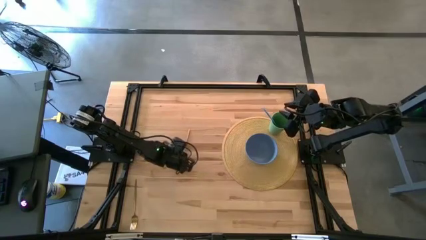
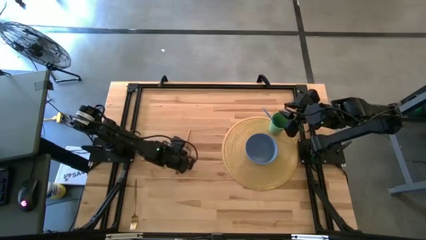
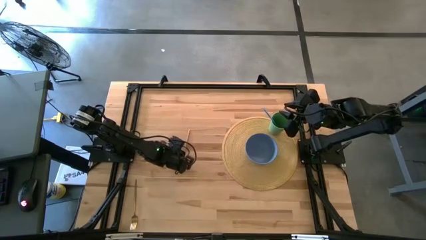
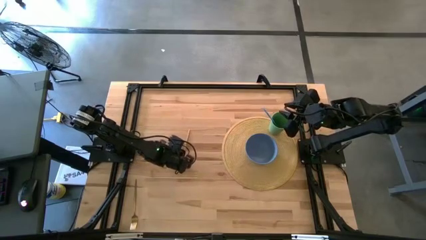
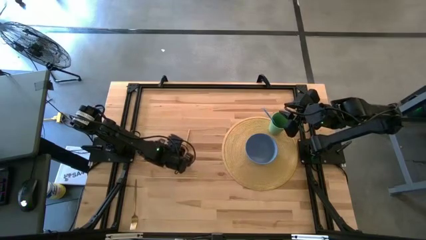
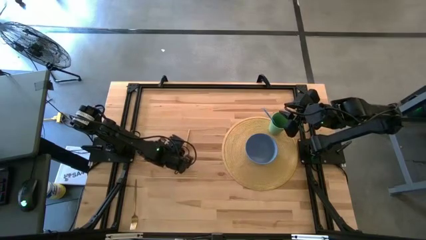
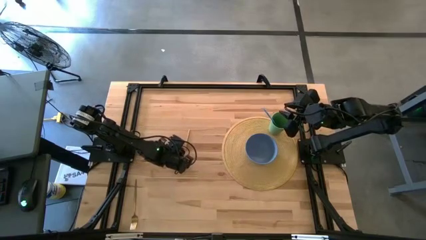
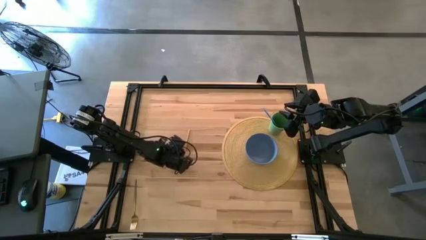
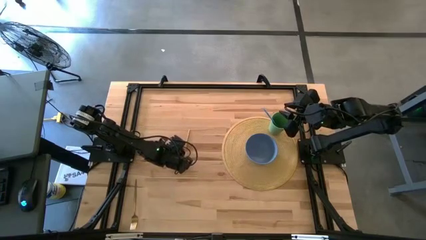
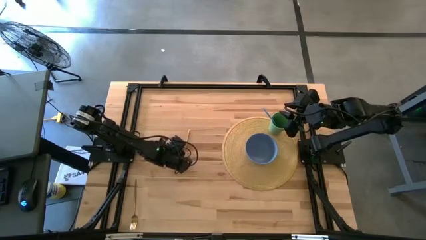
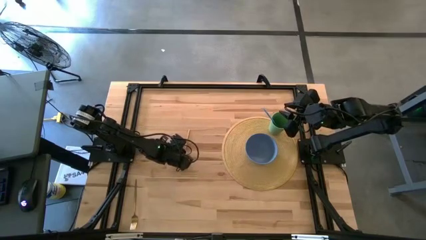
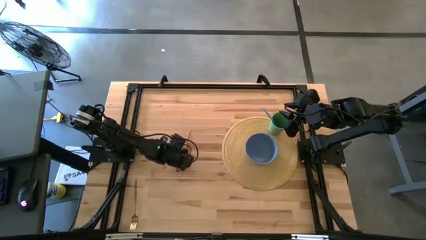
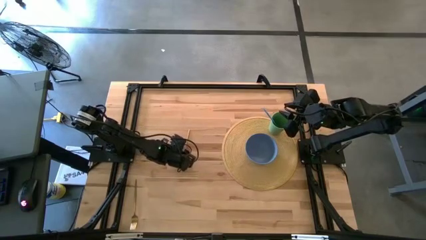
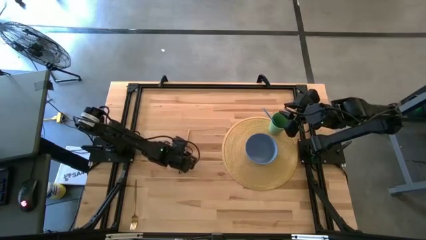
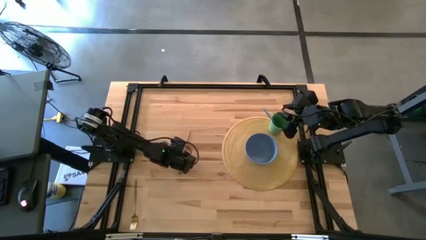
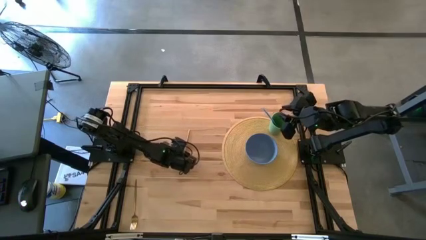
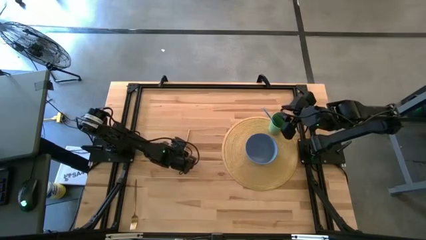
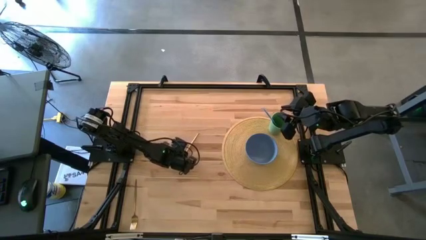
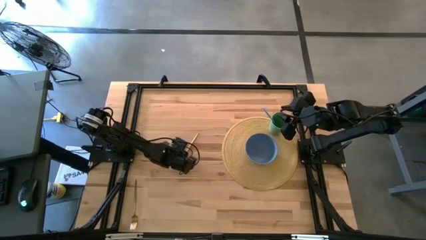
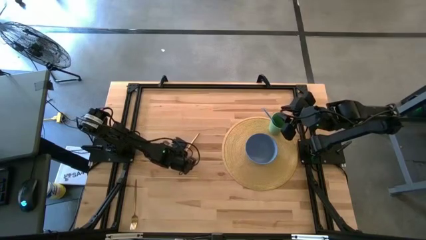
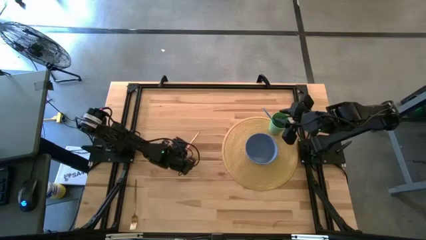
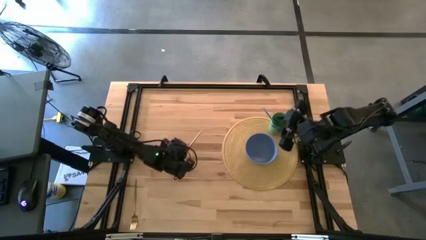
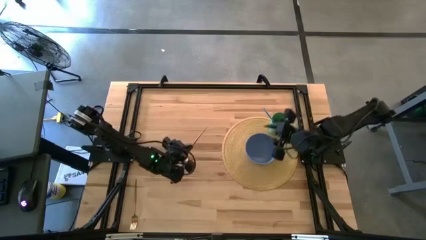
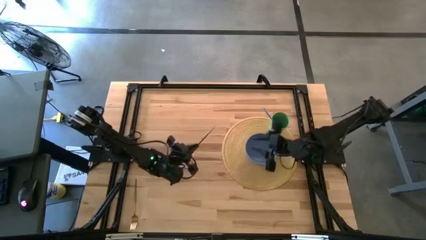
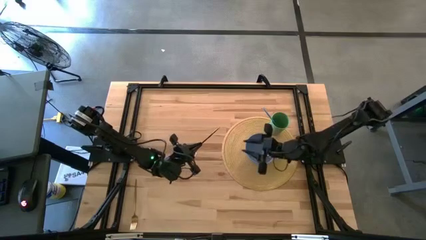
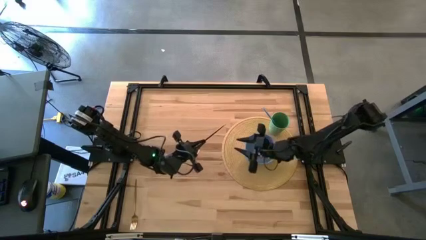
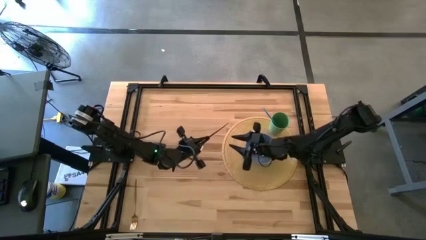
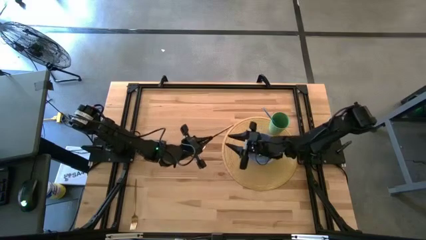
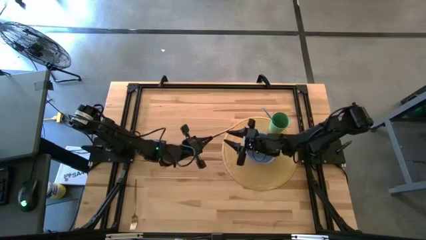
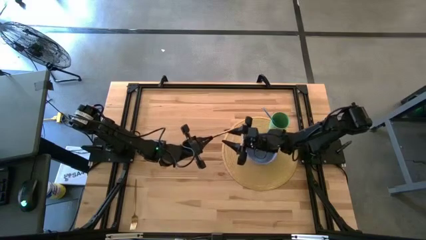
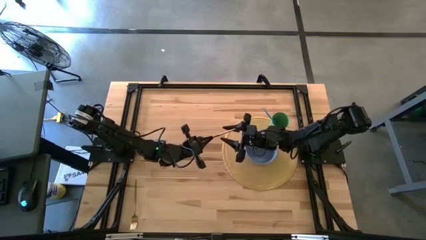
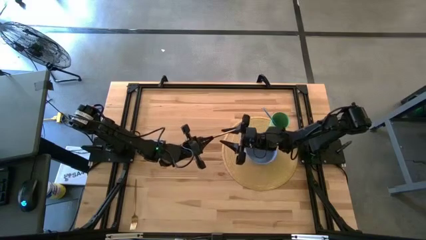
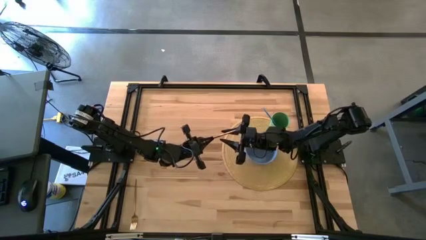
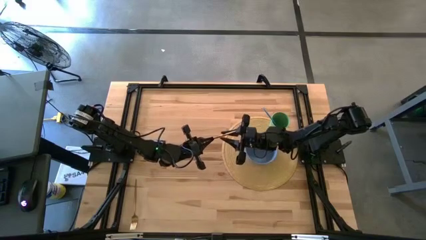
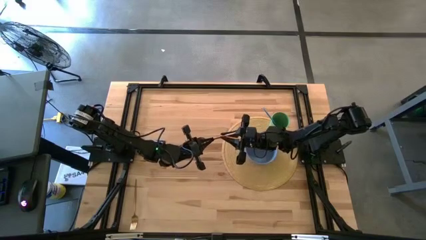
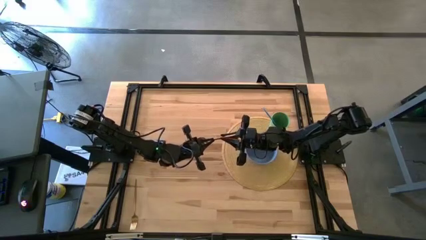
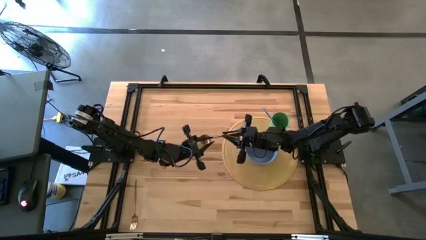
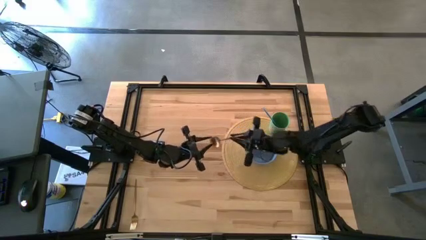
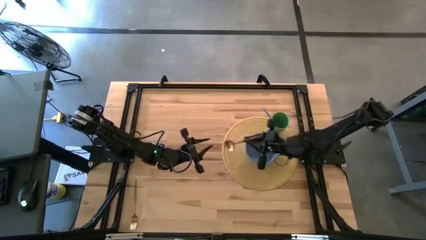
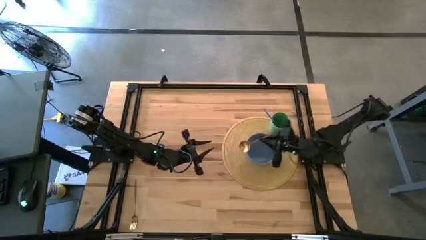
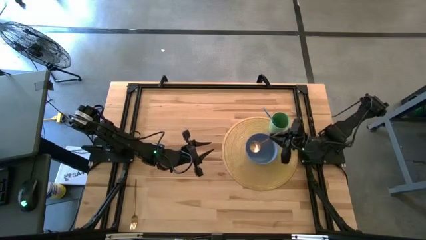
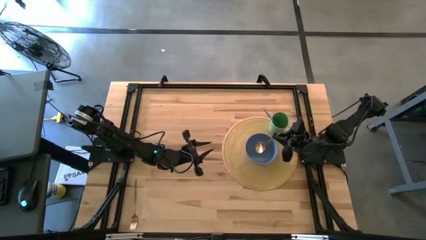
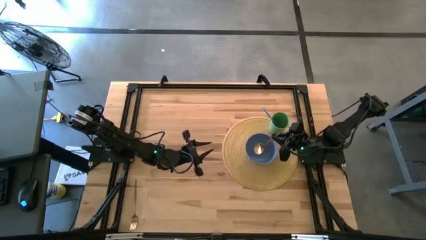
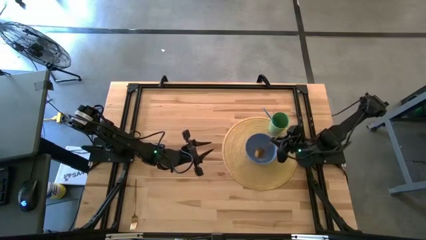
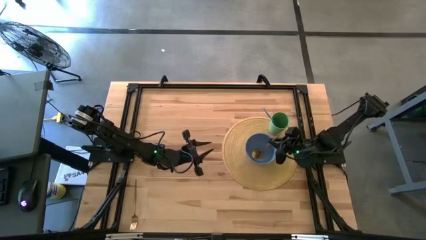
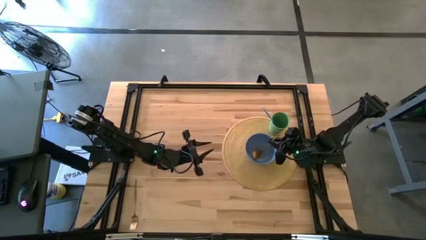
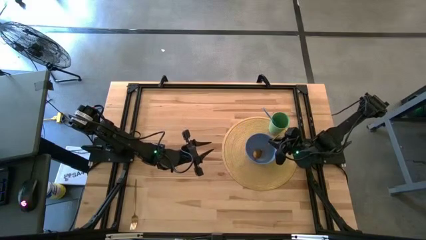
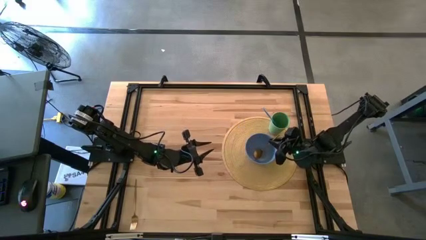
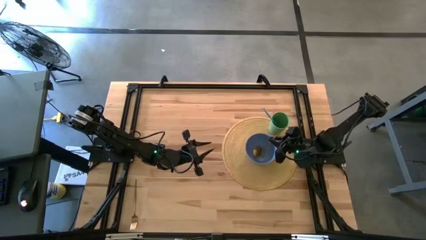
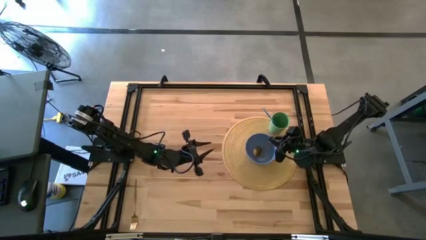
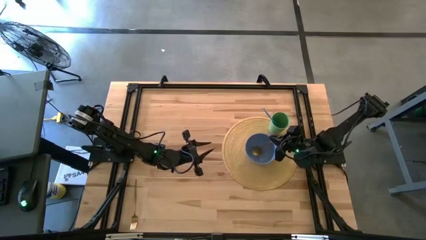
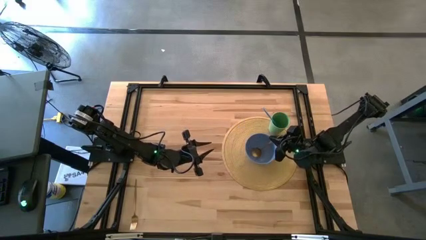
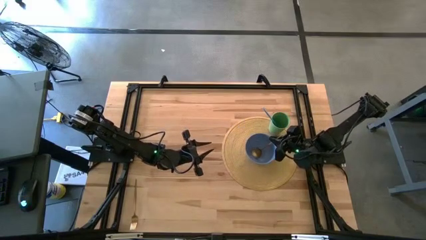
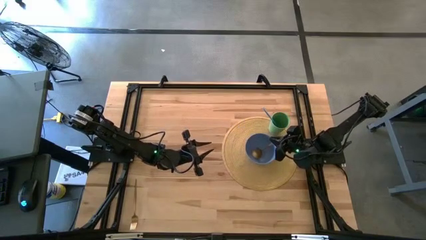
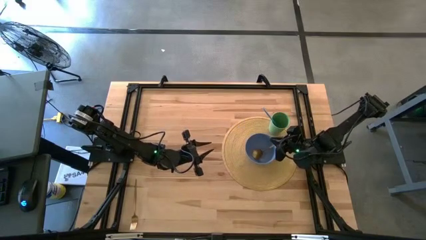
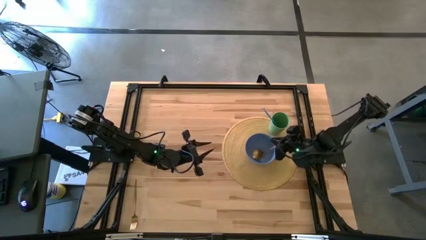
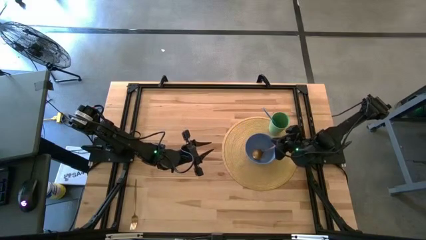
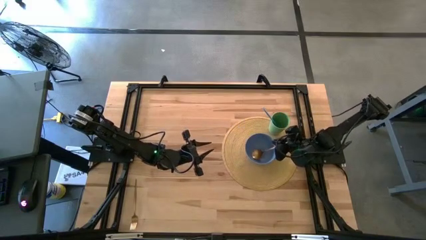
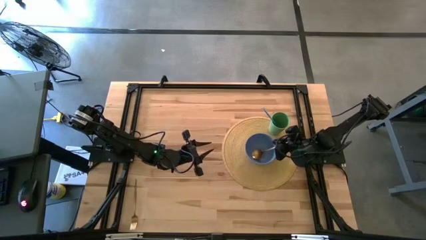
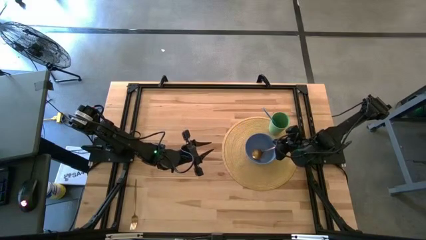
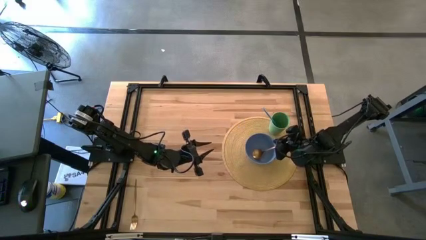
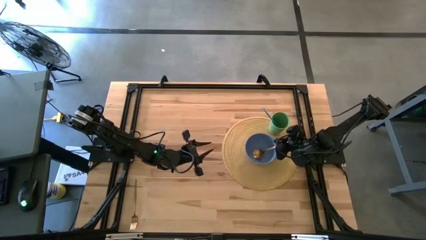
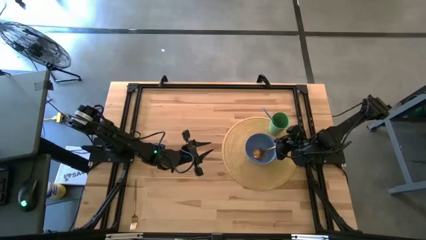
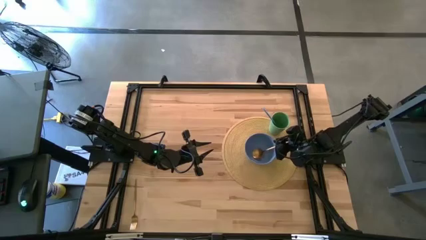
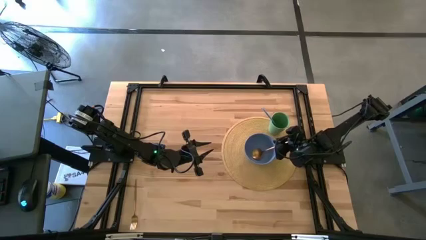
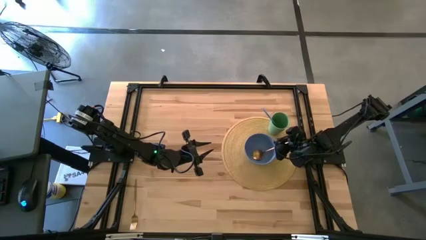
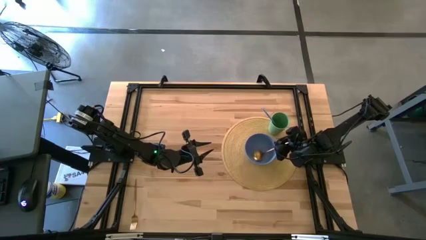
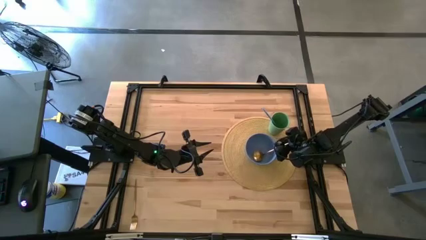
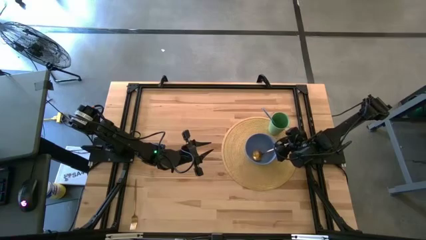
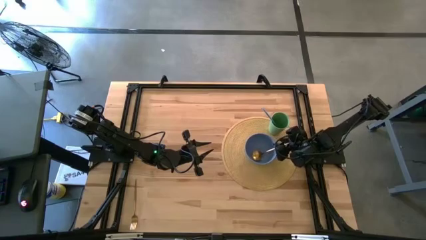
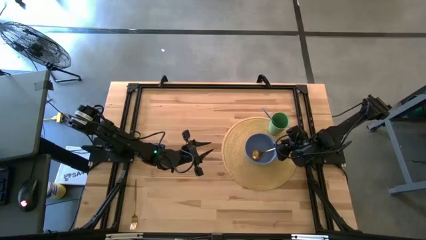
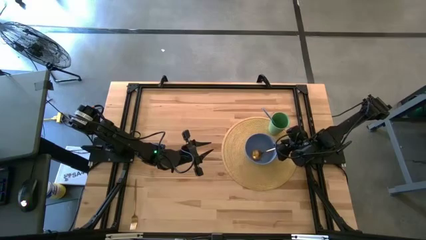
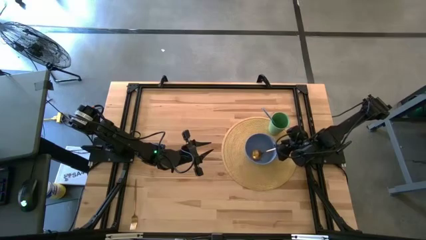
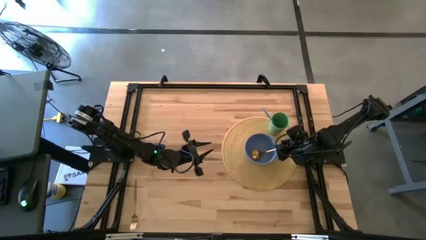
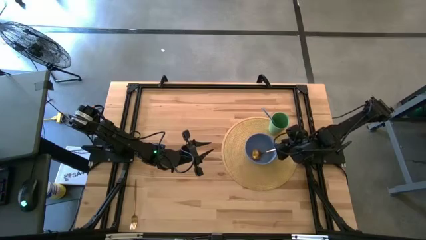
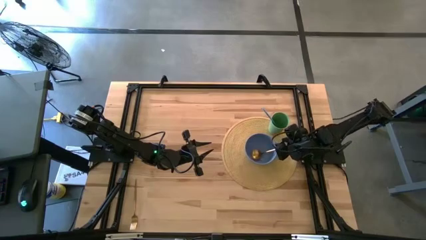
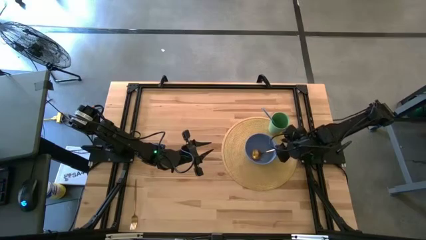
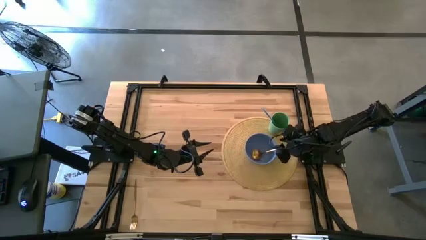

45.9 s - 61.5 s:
Task: Pick & Place Utensil
Put the gold spoon into the violet bowl

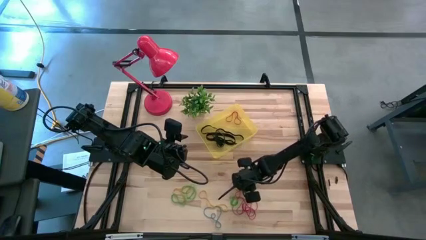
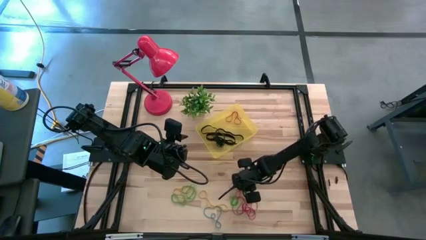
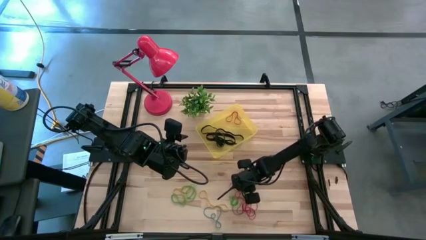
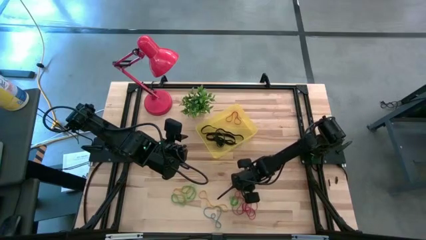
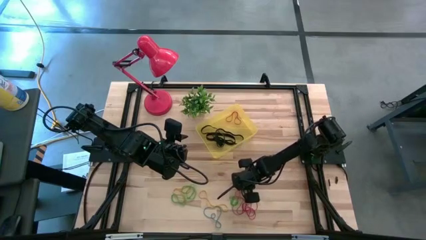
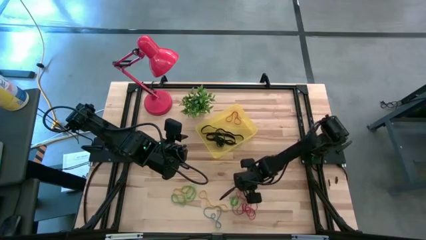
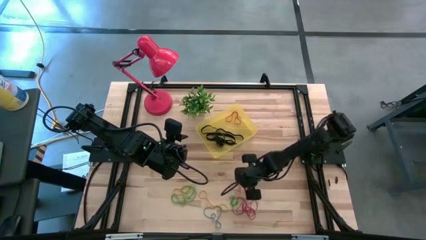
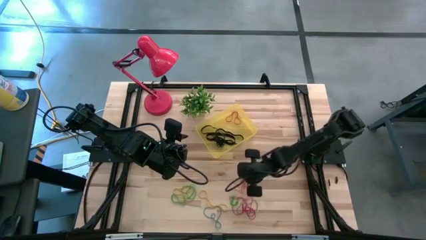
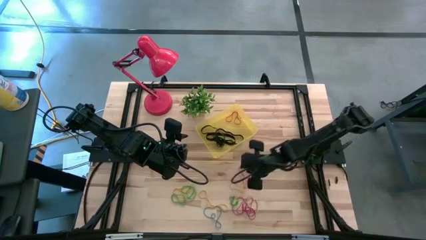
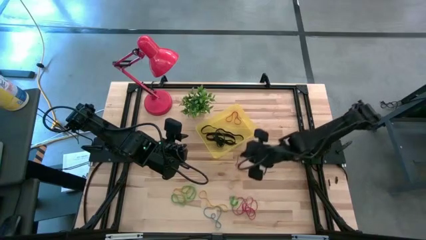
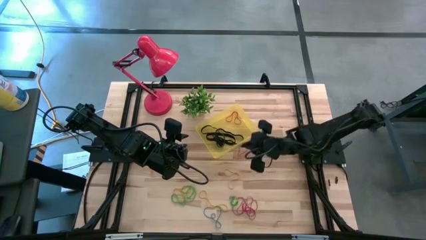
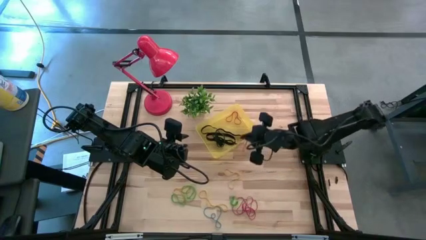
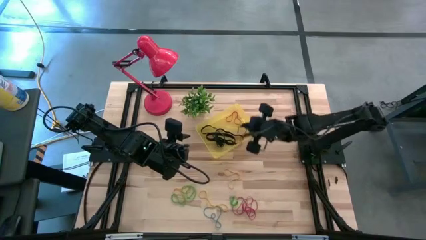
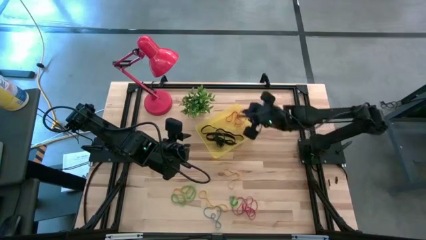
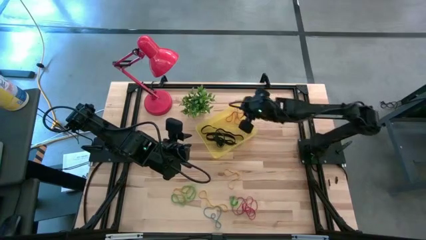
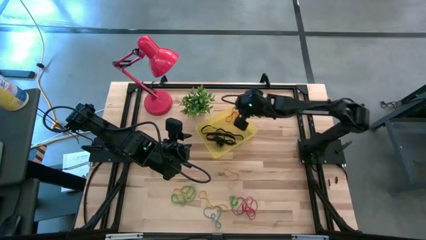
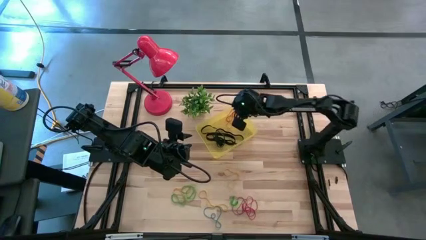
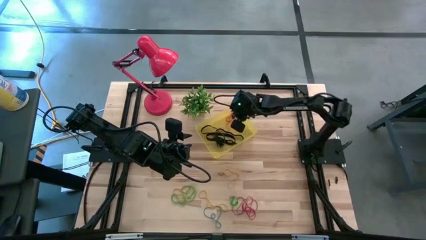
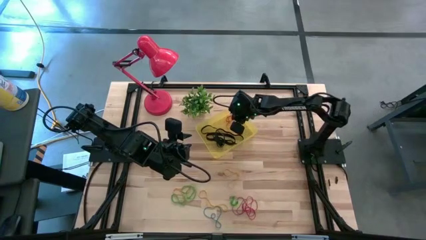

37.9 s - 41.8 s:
Task: Pick and place rubber bands into bin
Put the red rubber band into the transparent yellow bin
